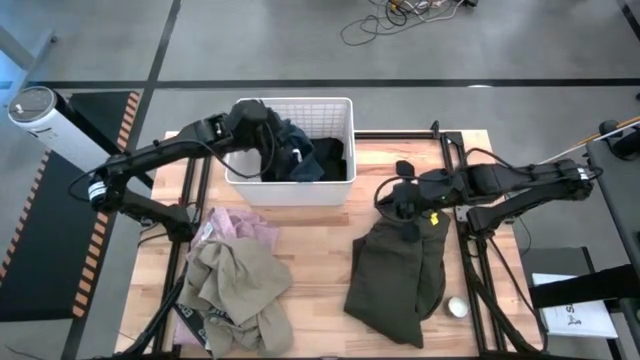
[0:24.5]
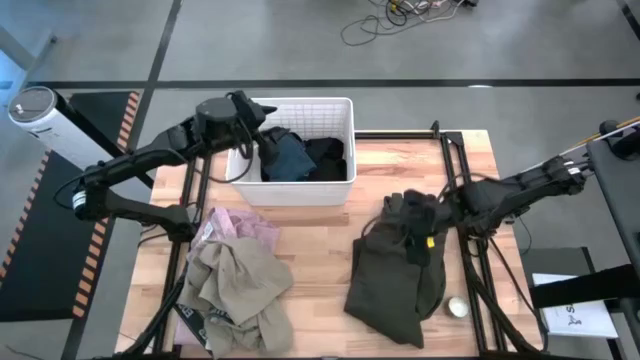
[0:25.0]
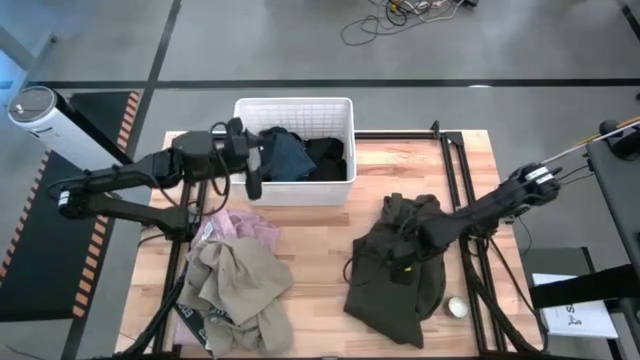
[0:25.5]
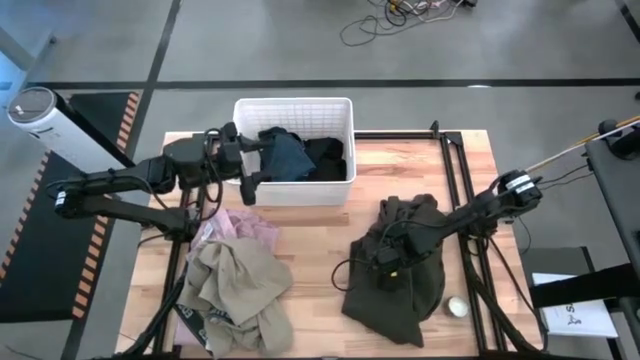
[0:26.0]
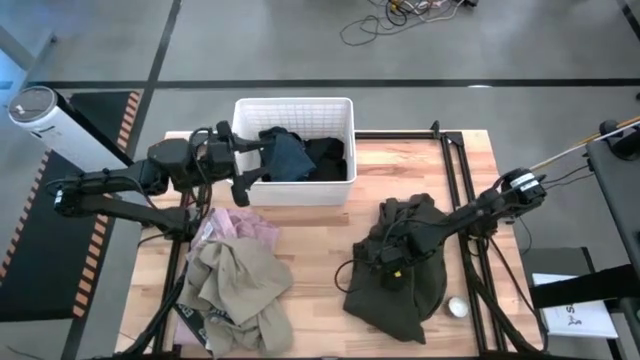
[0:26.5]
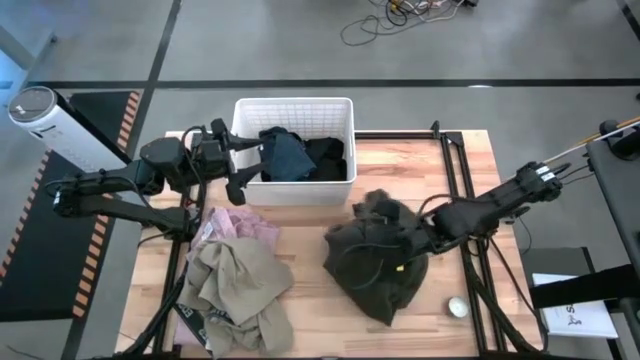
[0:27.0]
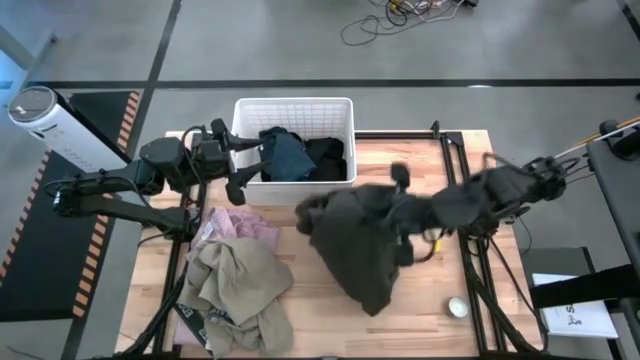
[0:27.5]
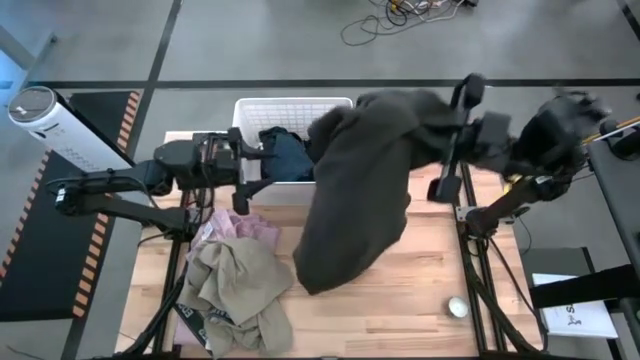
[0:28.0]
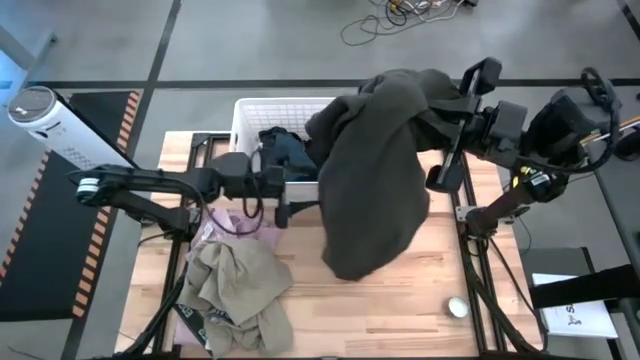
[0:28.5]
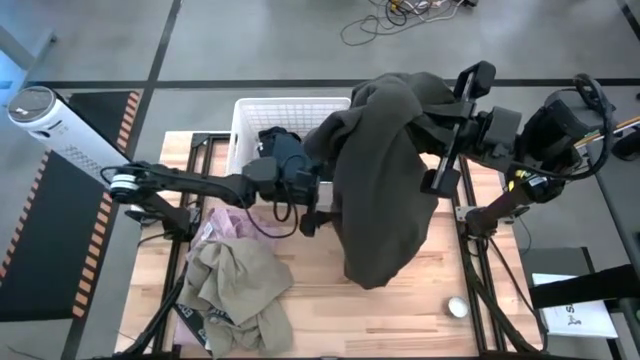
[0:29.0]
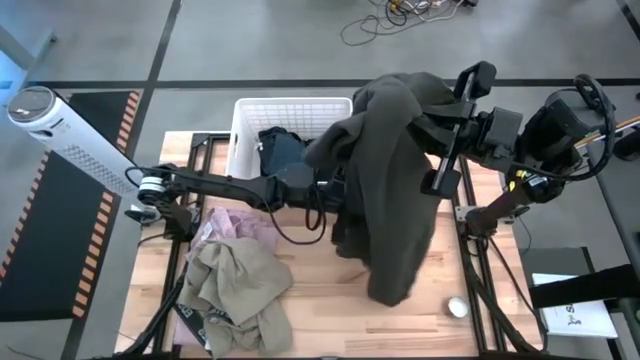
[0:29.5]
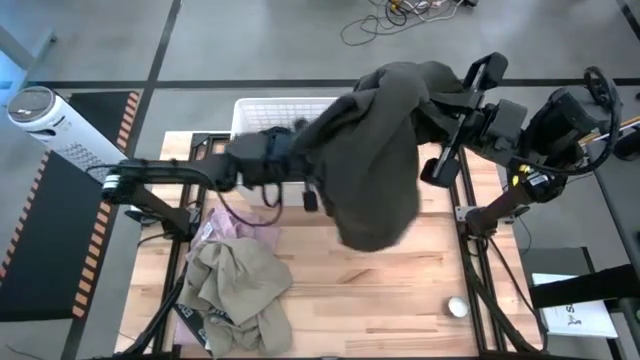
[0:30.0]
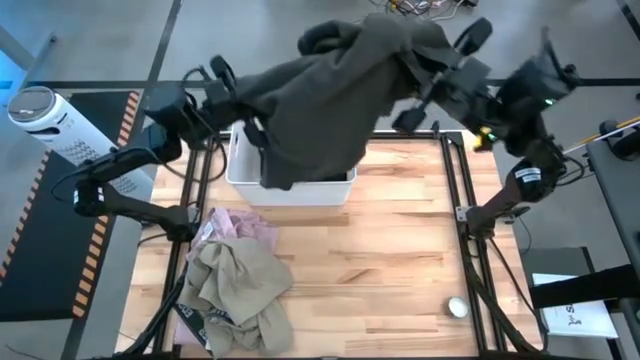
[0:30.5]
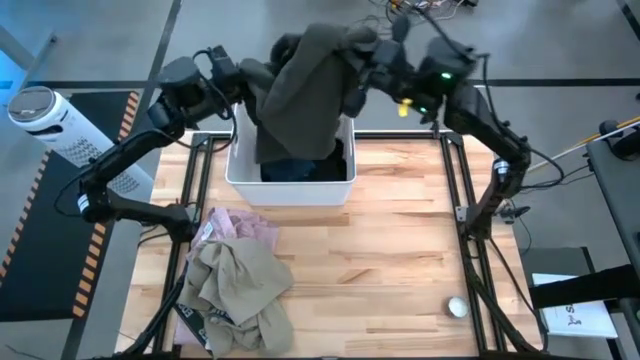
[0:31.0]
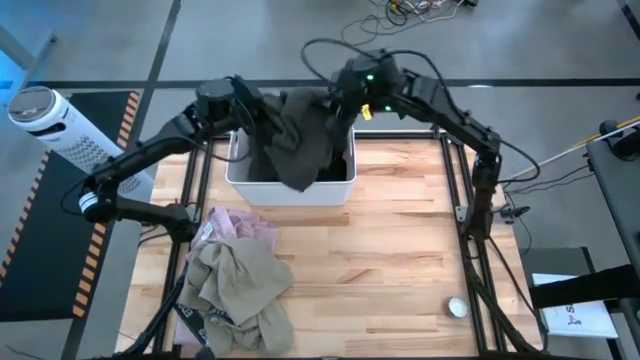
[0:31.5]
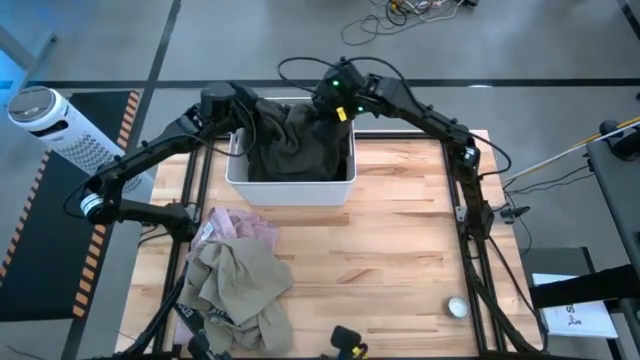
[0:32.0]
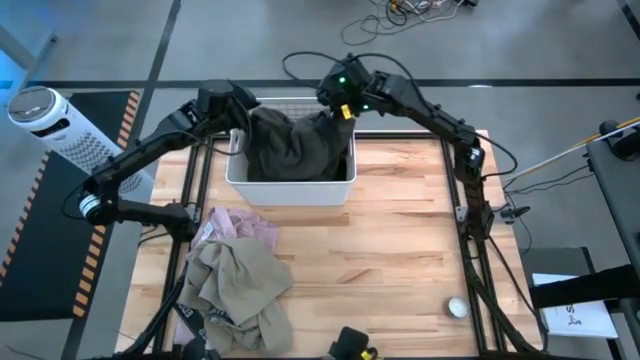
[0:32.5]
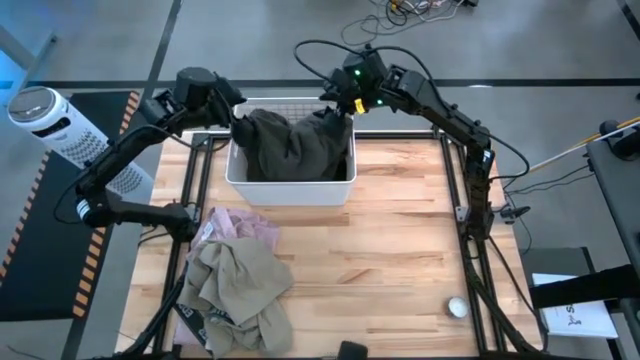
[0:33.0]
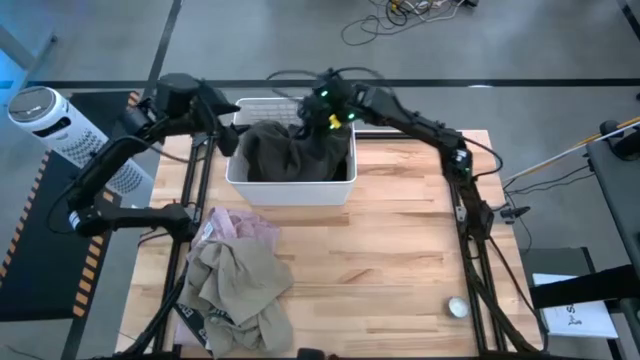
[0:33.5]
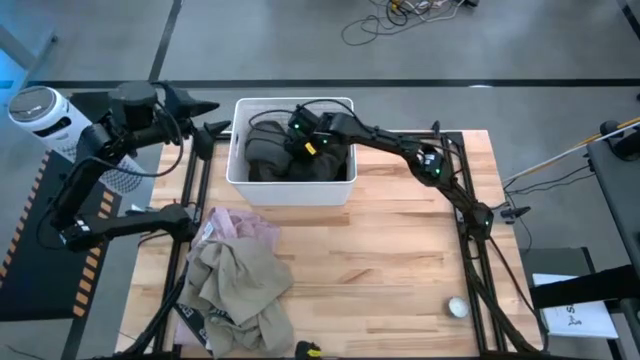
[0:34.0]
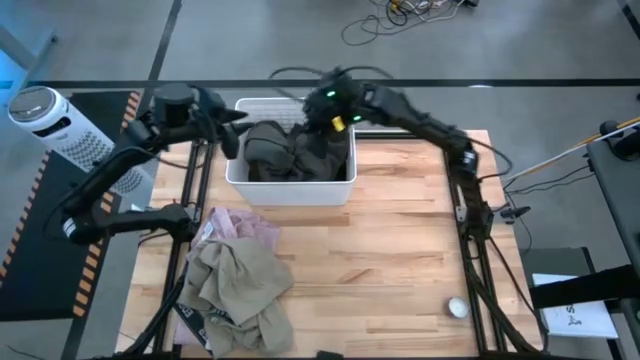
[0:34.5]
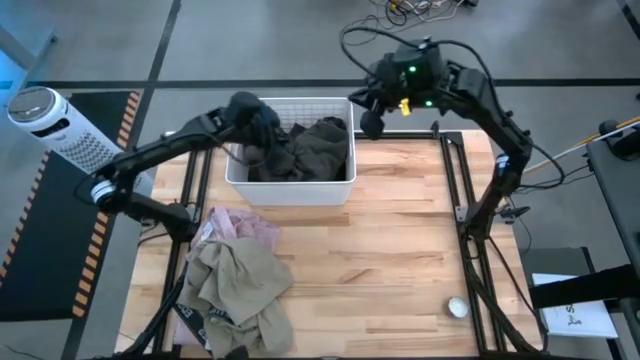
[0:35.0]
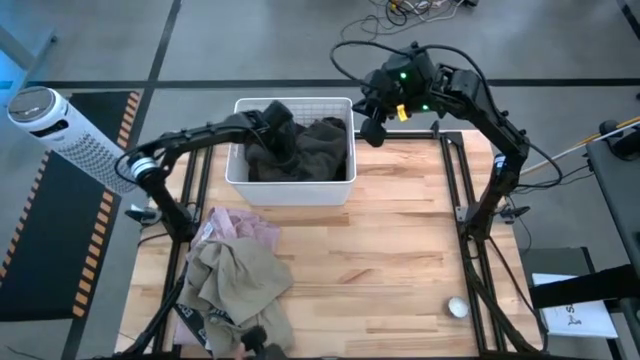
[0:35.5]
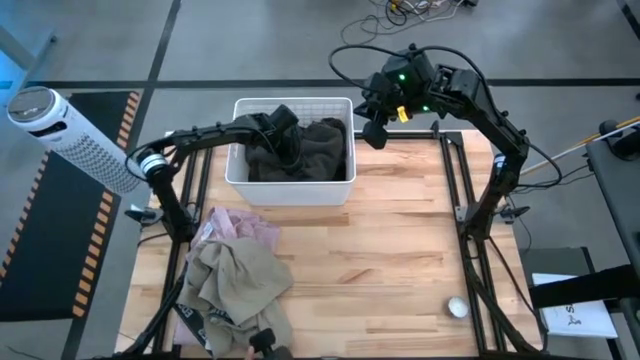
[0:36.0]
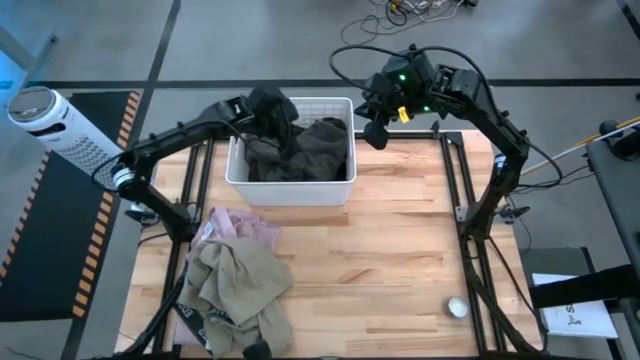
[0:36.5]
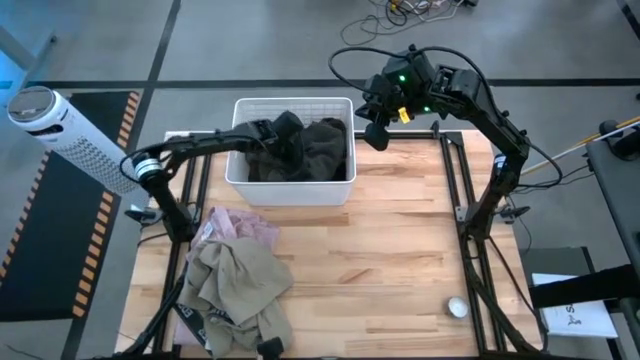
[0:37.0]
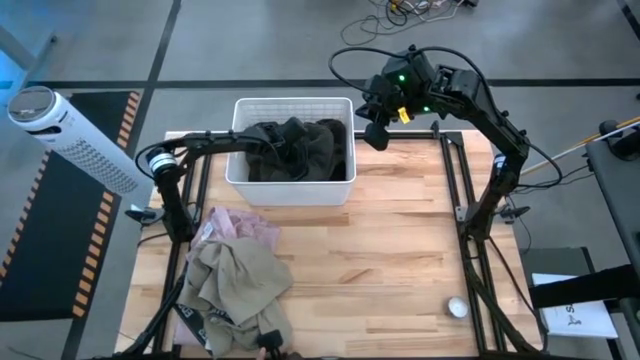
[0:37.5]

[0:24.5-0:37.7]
Task: Sort clothes
Put the sweater into the bin

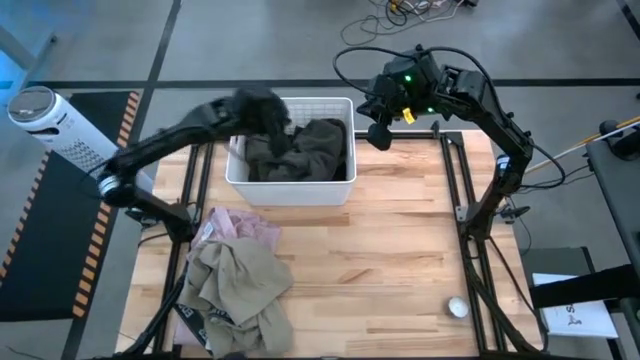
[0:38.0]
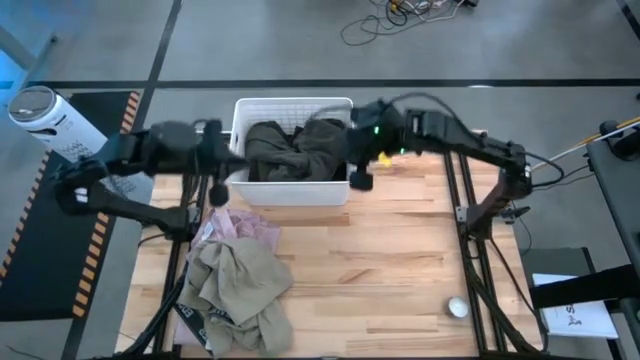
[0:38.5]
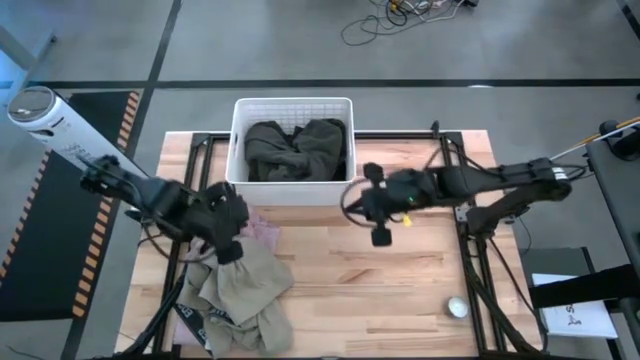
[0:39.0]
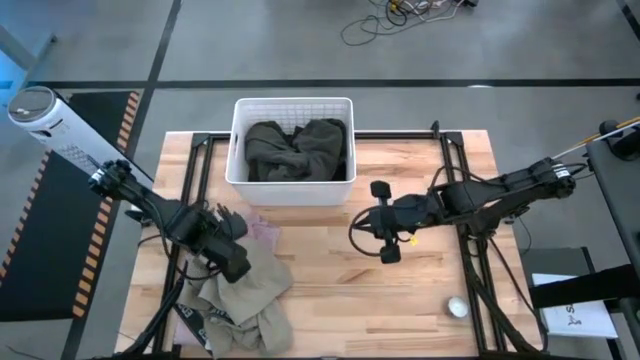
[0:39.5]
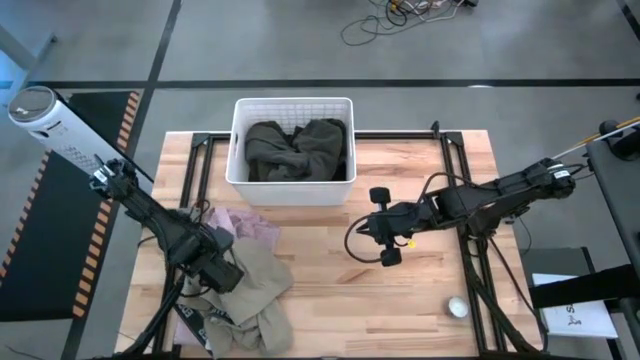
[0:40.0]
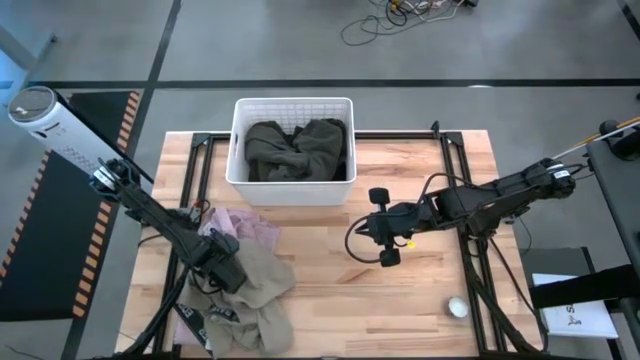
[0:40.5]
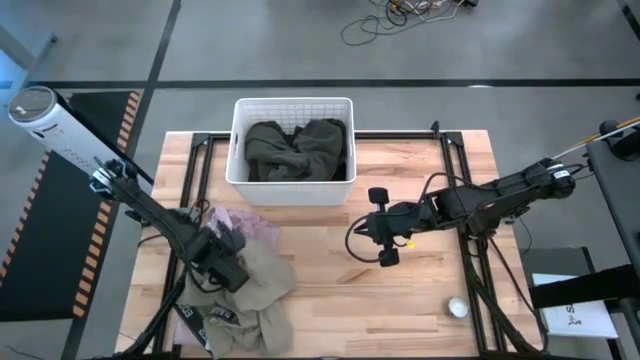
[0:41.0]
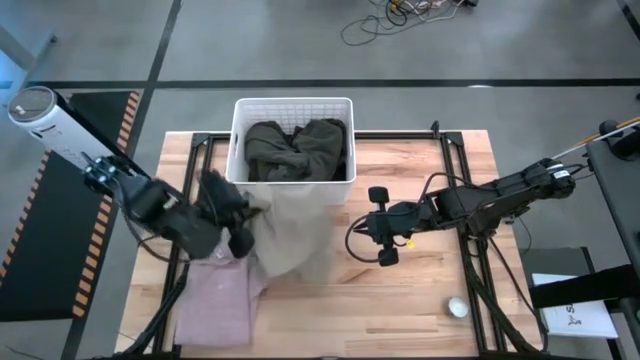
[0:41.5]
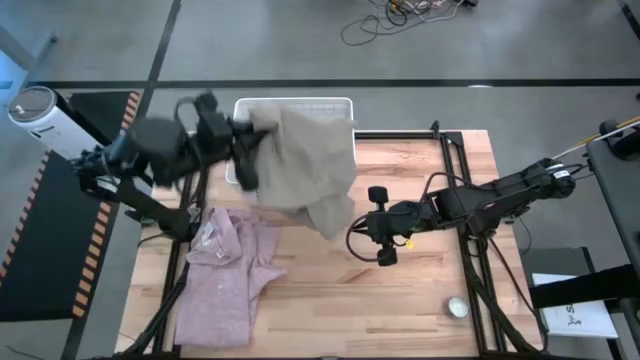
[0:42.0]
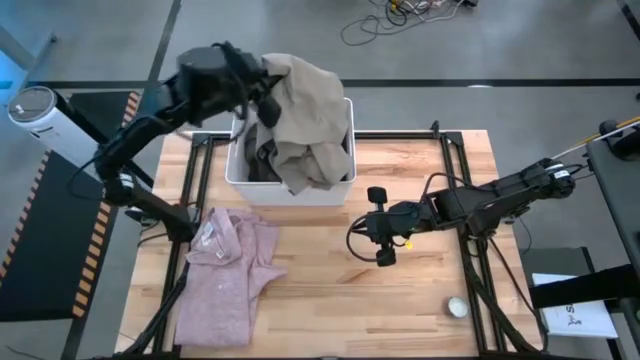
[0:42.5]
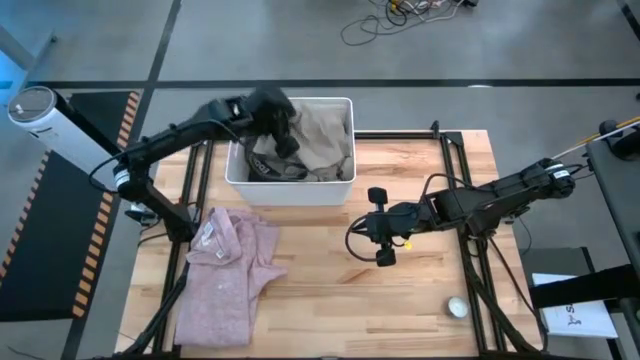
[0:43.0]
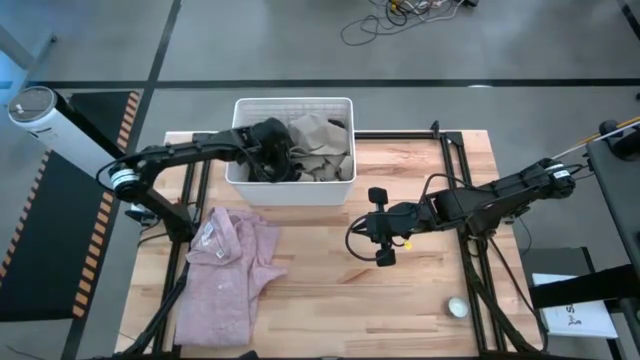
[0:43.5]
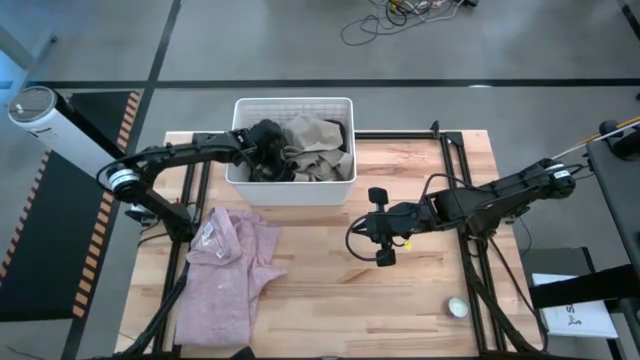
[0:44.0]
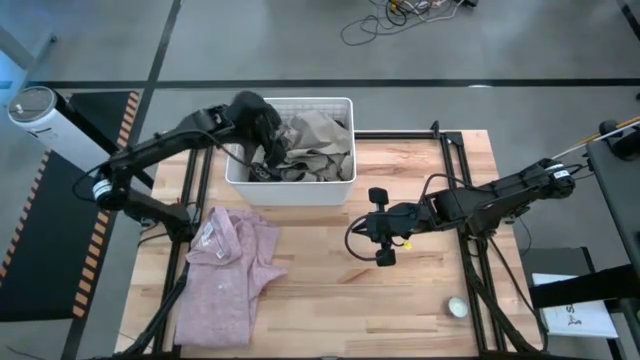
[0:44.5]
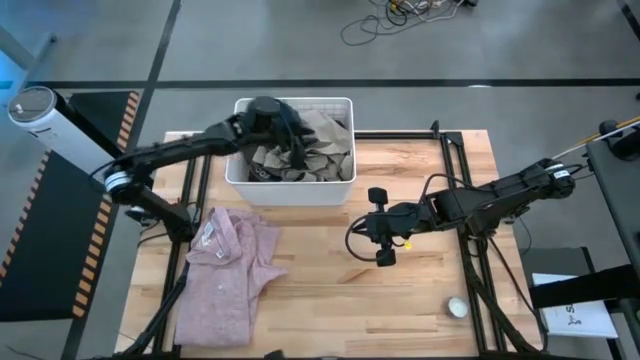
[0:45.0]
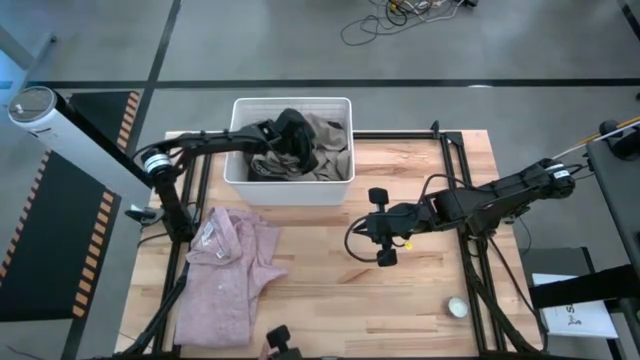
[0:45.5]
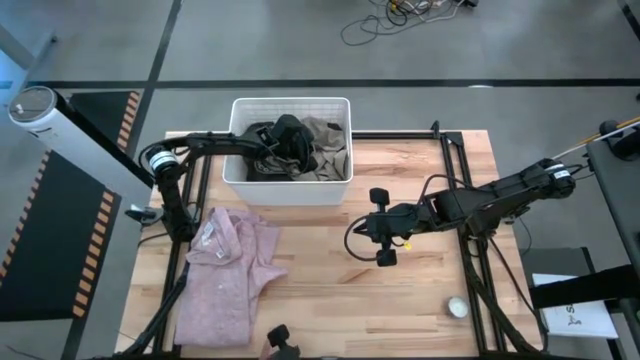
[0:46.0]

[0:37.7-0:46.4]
Put the brown shorts into the bin
